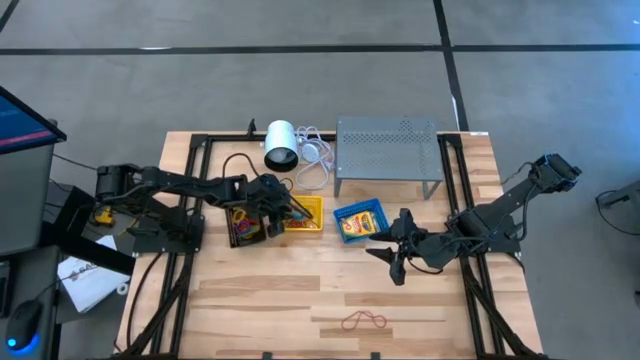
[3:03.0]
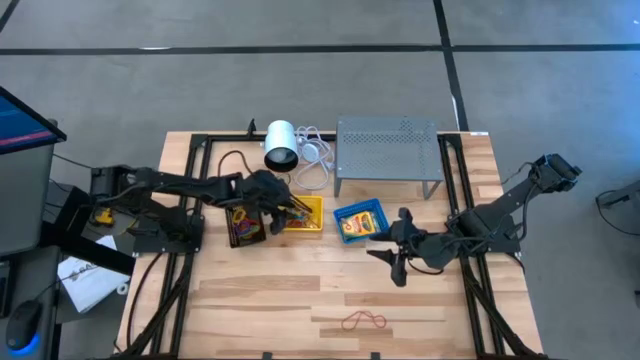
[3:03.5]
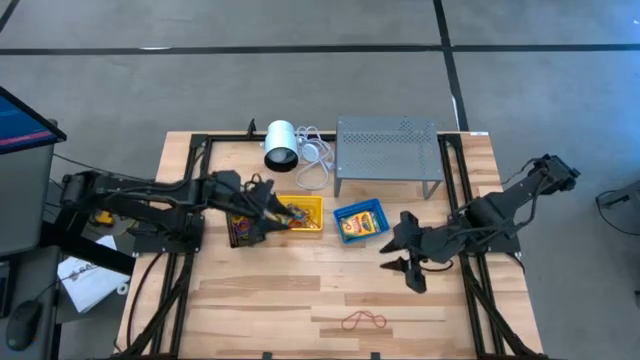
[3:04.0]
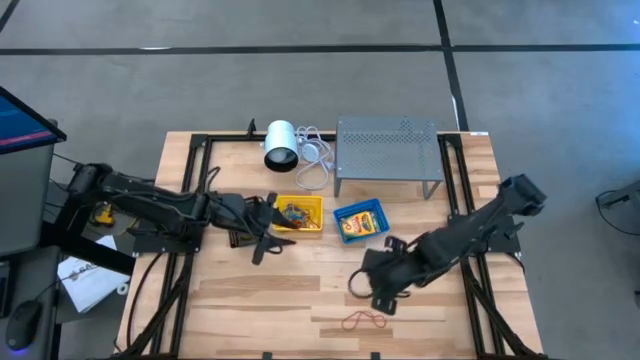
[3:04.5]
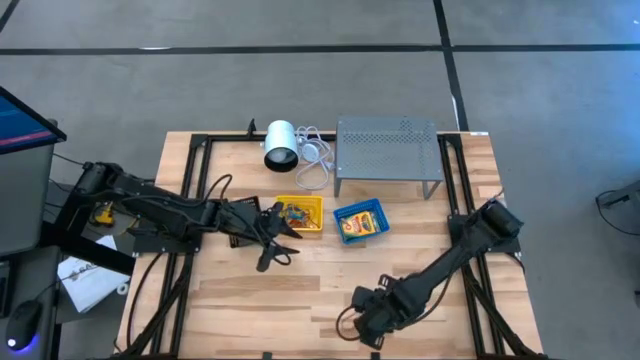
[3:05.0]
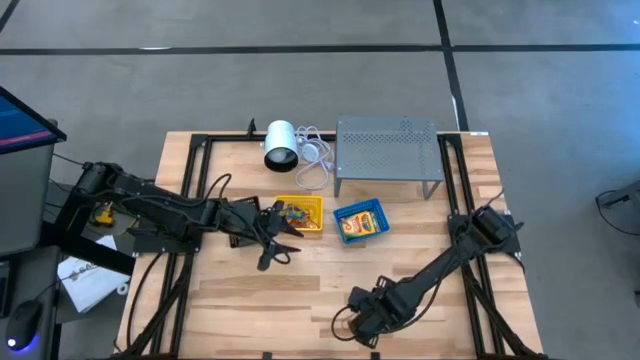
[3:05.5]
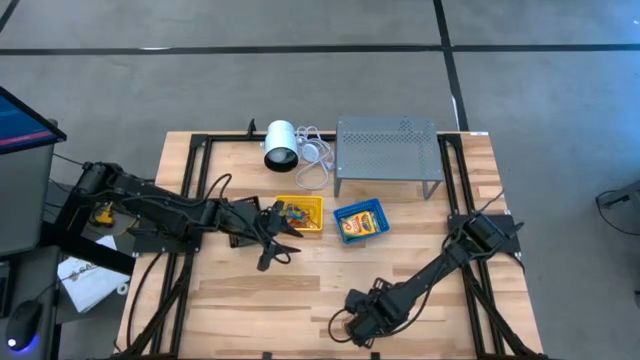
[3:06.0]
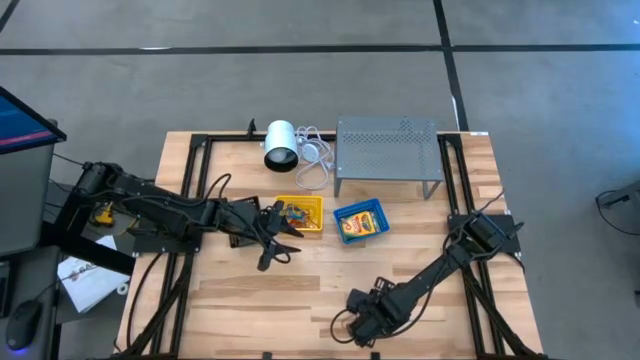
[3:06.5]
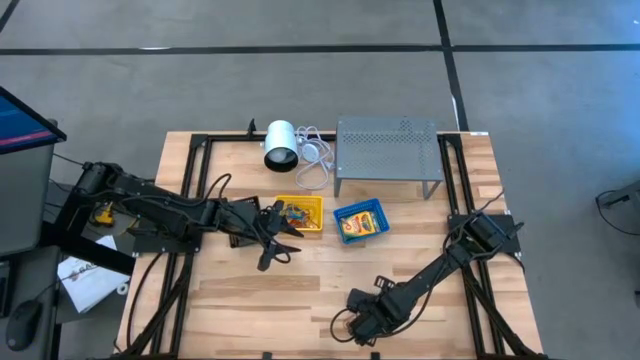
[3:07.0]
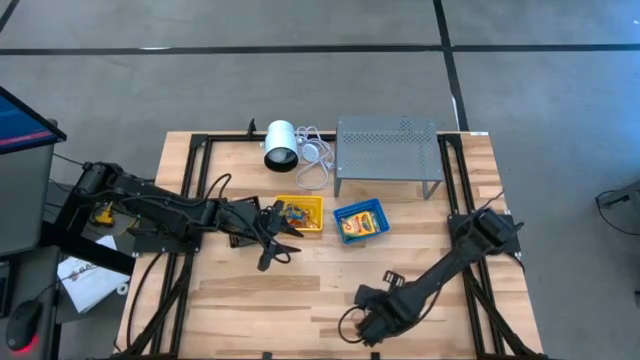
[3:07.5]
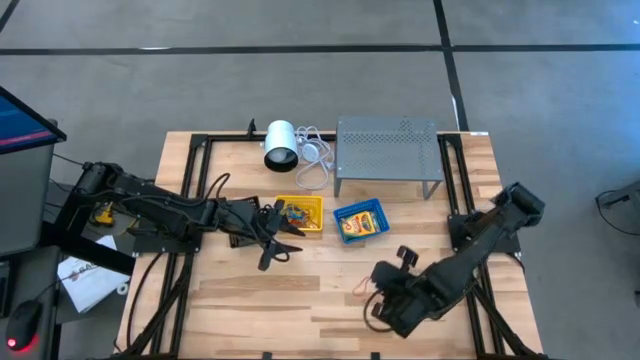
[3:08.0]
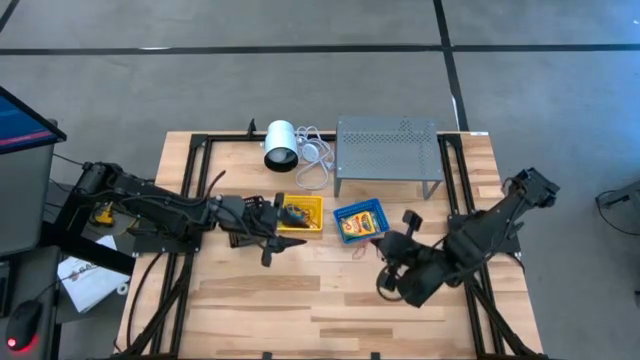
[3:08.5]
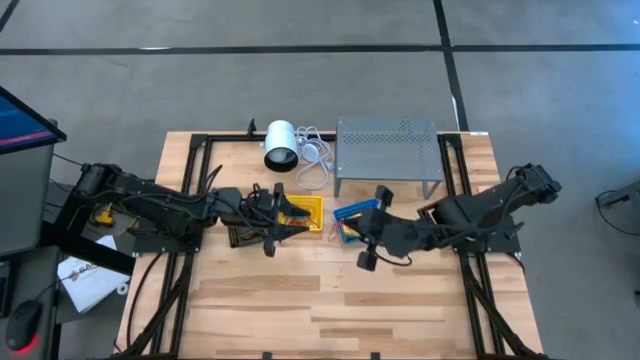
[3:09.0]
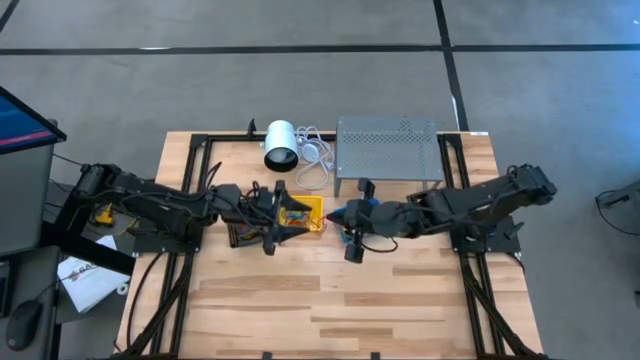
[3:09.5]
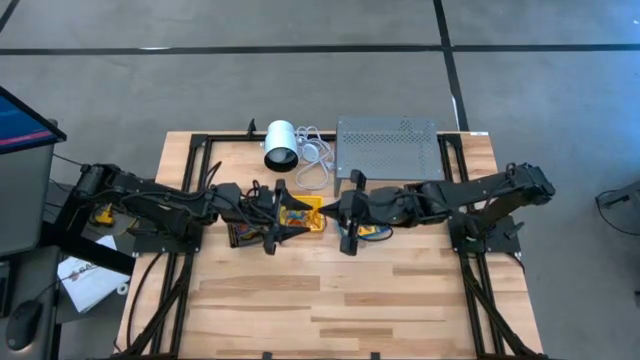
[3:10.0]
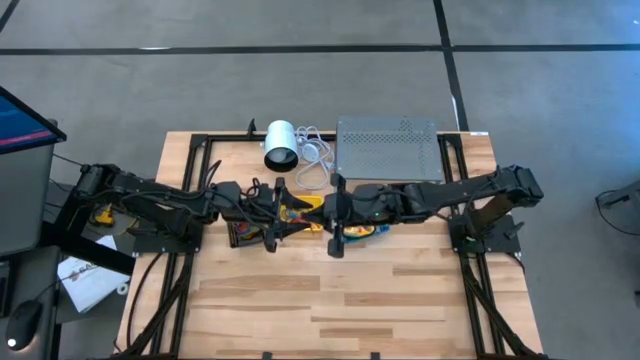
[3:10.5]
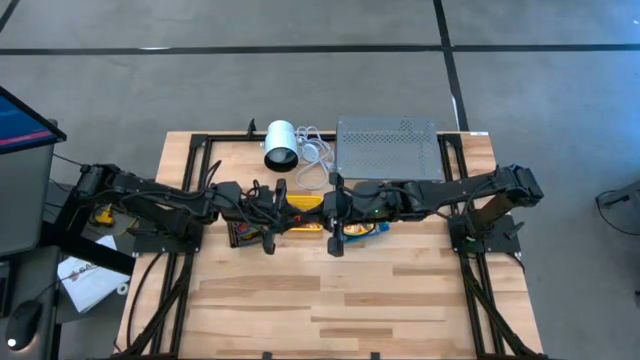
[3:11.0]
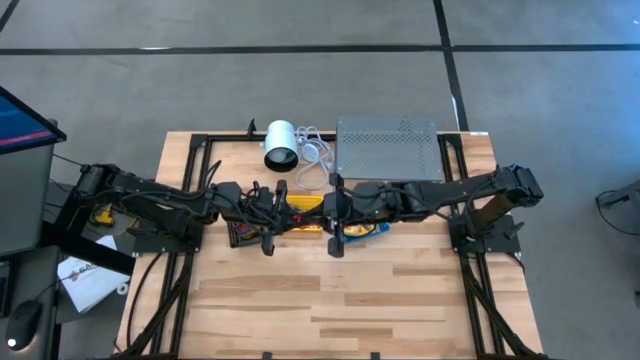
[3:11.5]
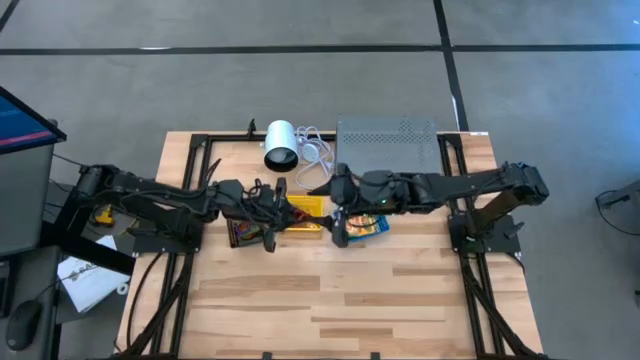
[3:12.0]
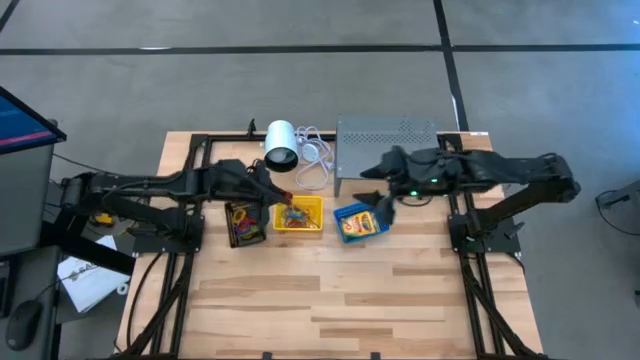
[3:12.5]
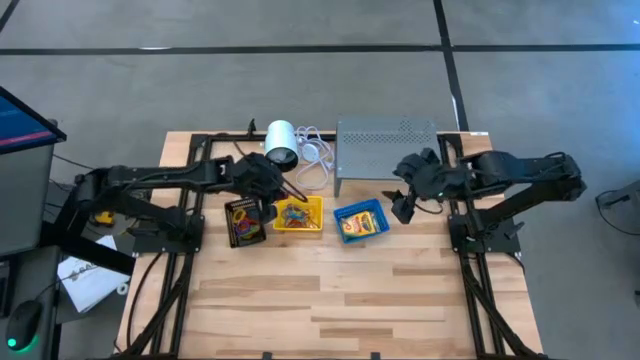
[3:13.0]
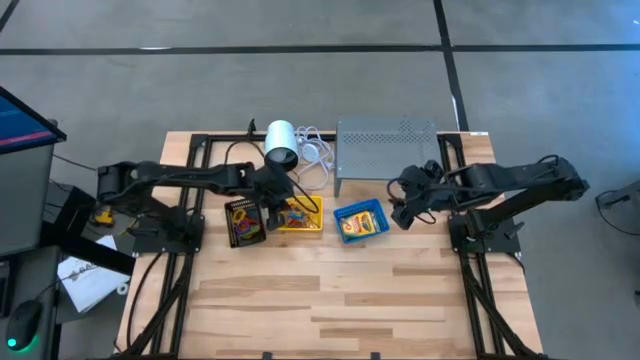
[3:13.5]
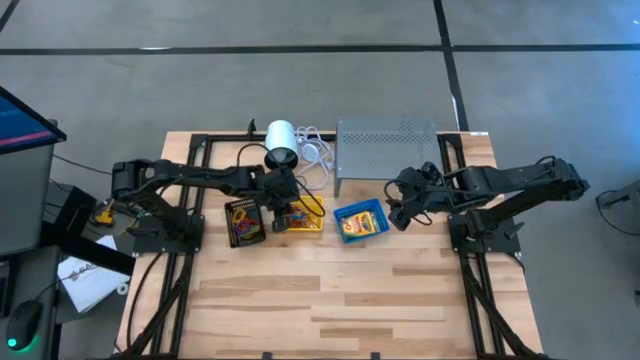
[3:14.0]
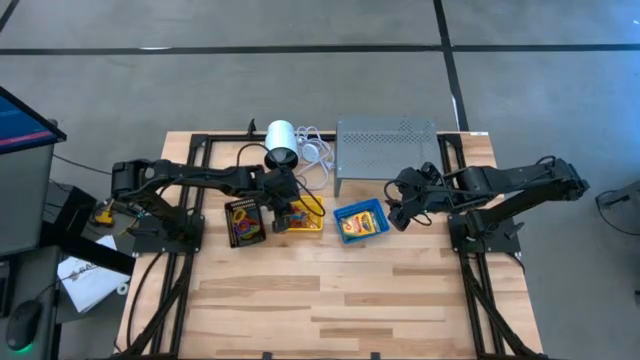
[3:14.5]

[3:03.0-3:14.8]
Task: Pick & Place Office Desk Supplies
Put the red rubber band into the yellow bin

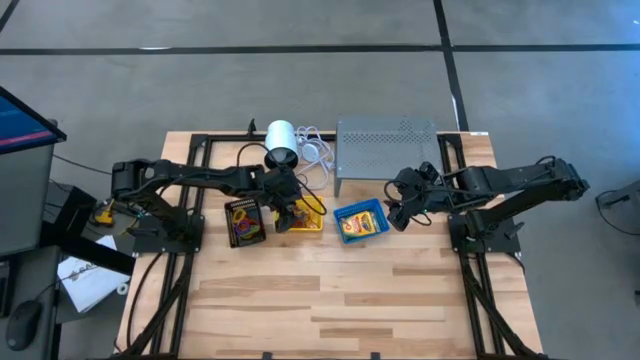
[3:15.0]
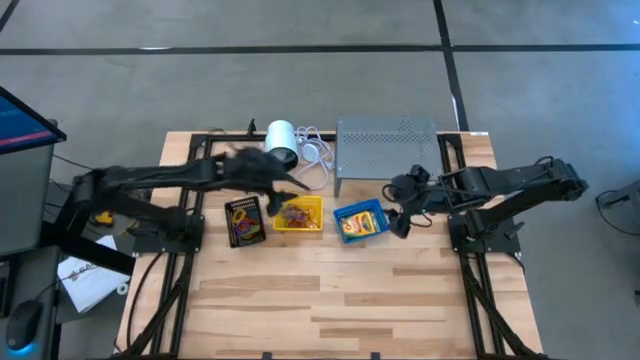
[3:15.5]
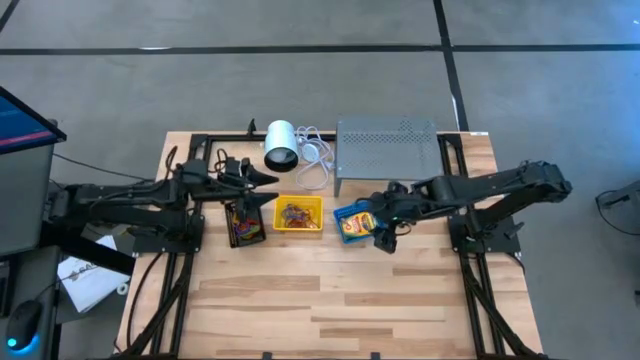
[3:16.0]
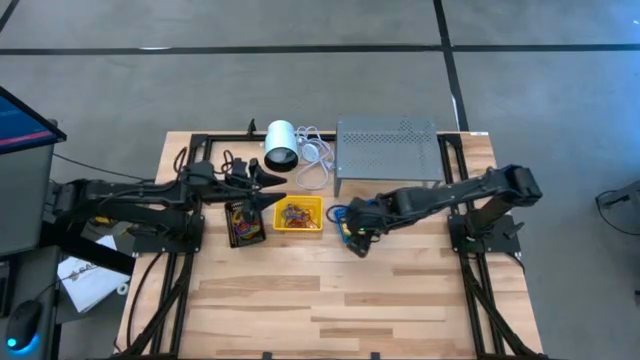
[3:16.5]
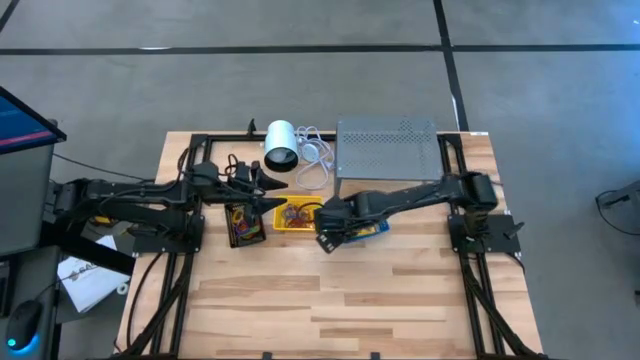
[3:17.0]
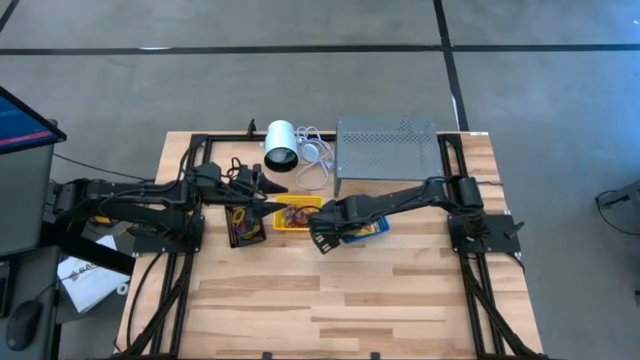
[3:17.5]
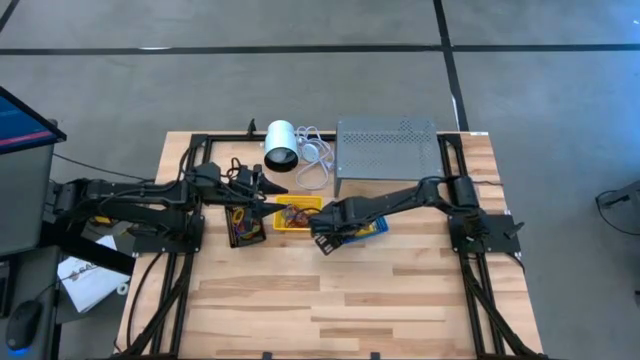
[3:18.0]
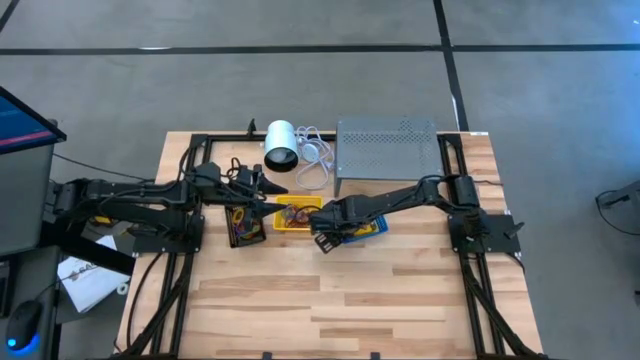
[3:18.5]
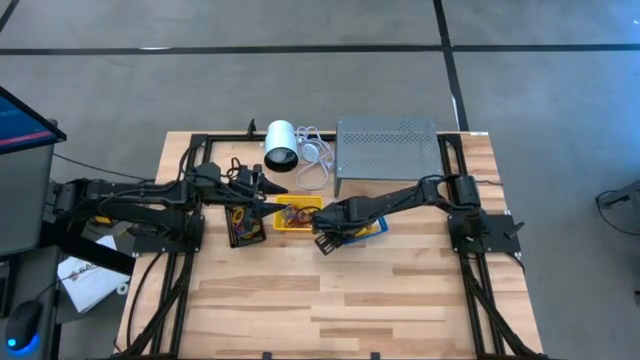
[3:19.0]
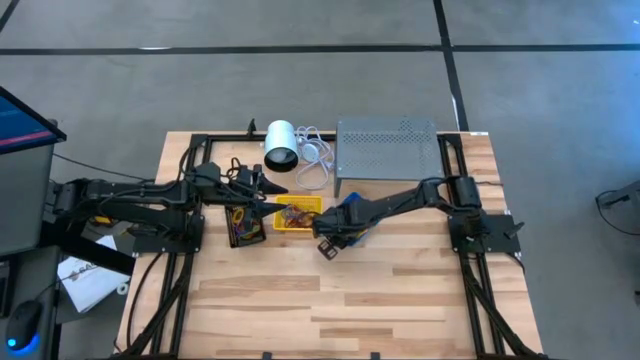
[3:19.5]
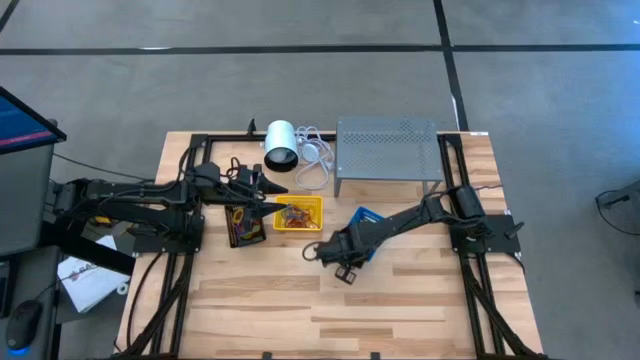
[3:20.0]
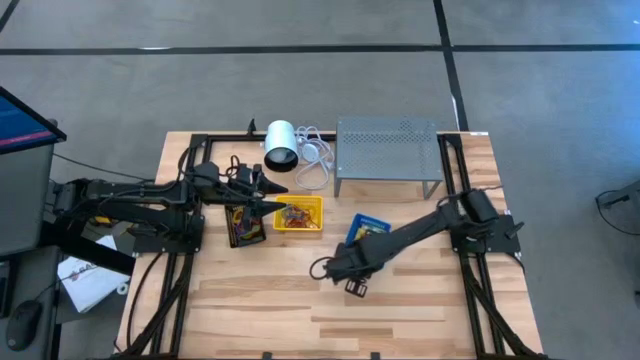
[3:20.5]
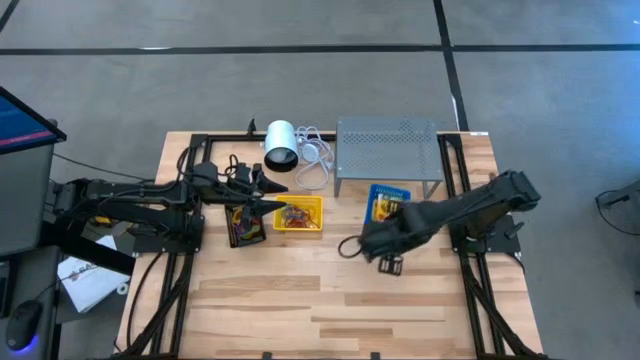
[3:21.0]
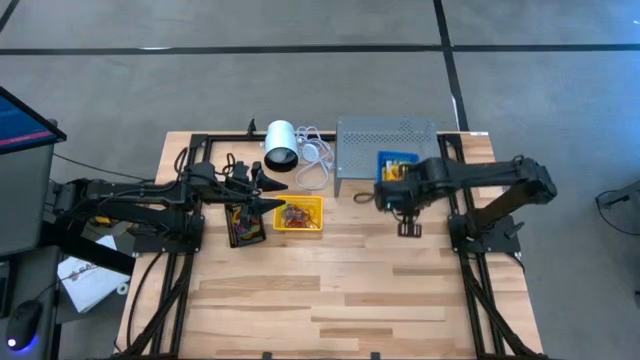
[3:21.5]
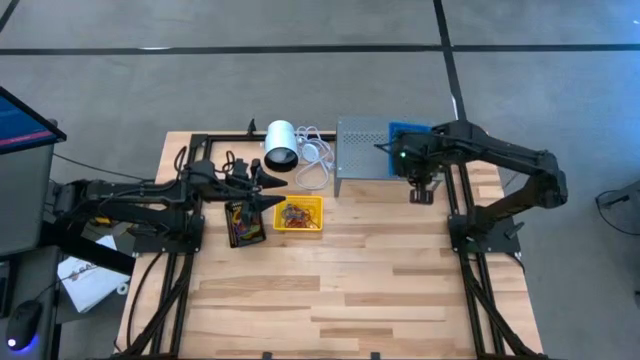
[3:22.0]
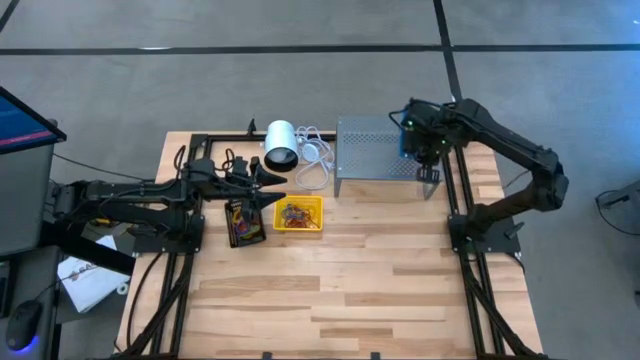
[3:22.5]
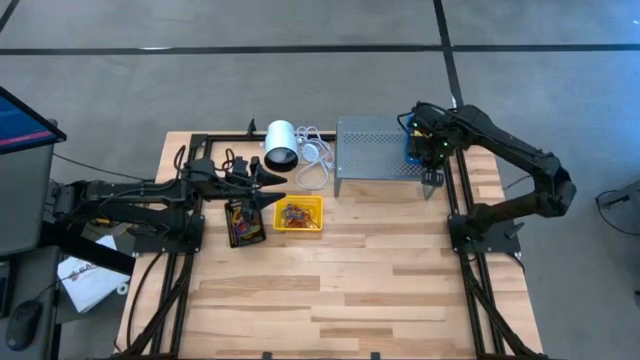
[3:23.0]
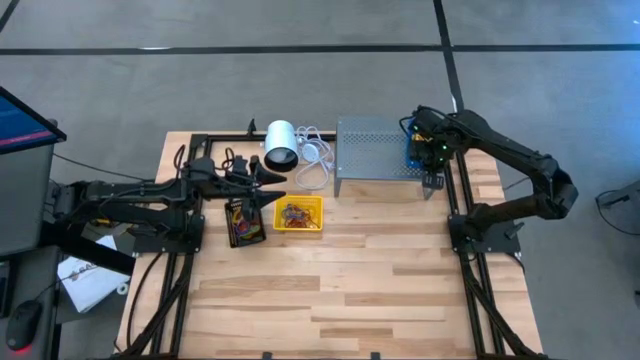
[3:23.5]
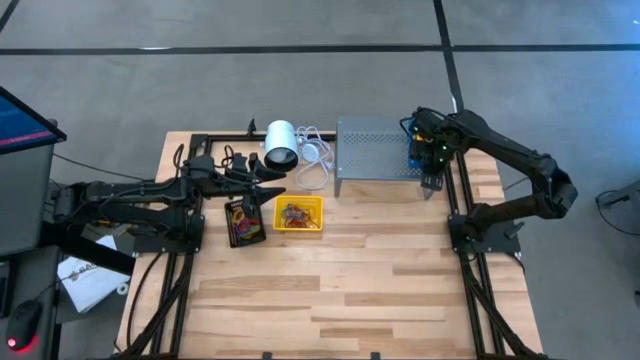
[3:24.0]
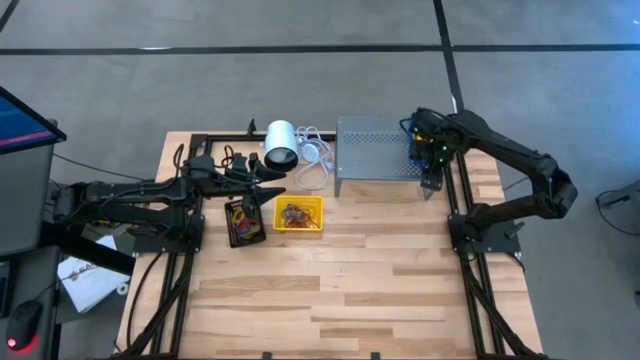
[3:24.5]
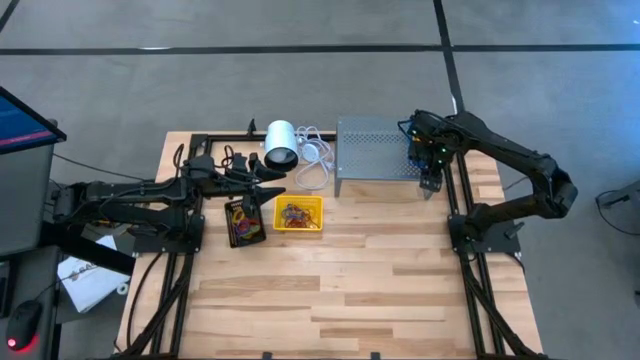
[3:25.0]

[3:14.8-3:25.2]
Put the blue bin on the shelf
